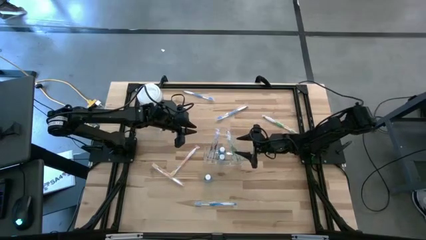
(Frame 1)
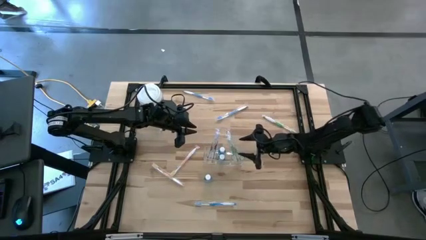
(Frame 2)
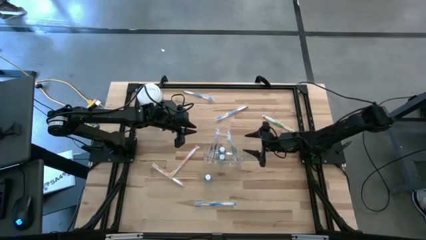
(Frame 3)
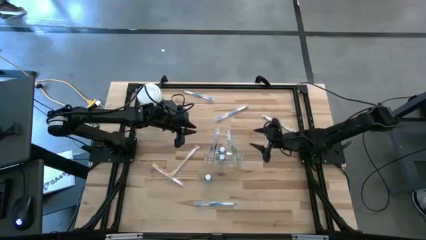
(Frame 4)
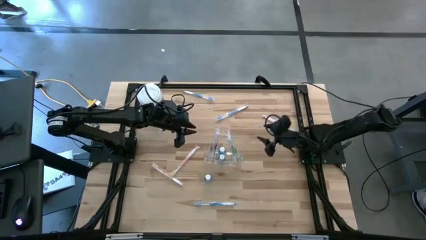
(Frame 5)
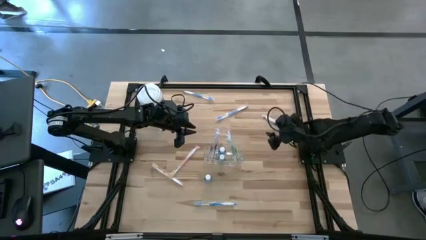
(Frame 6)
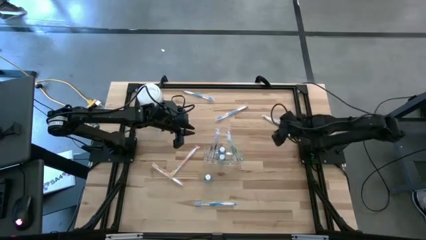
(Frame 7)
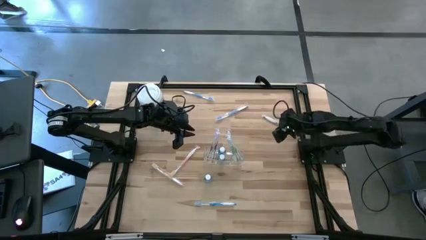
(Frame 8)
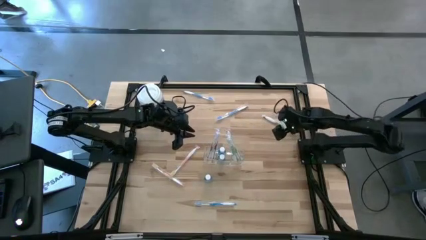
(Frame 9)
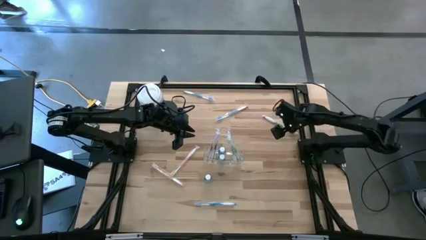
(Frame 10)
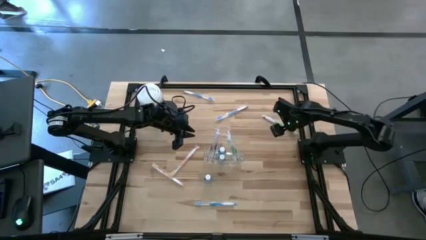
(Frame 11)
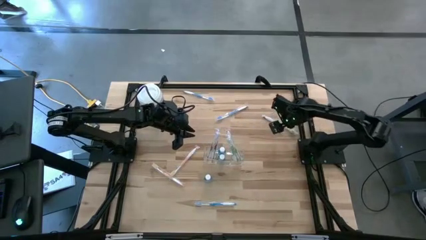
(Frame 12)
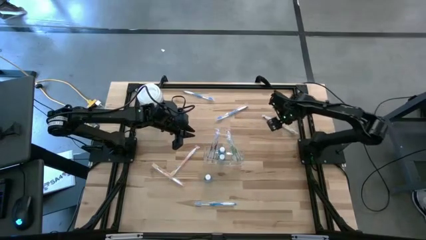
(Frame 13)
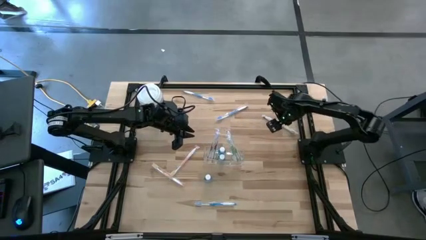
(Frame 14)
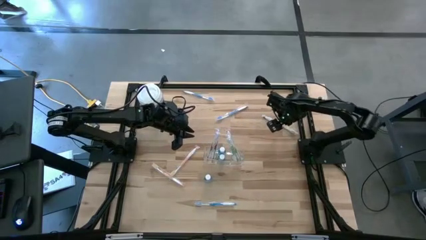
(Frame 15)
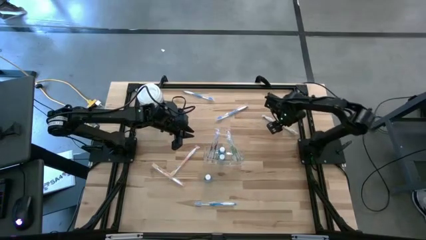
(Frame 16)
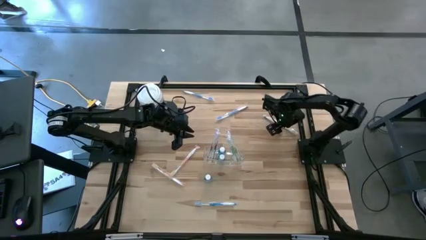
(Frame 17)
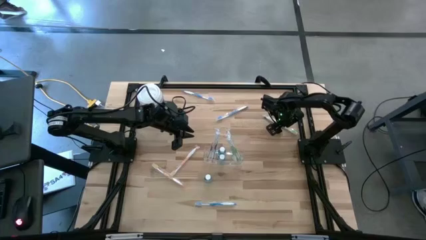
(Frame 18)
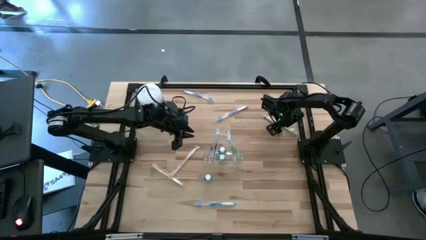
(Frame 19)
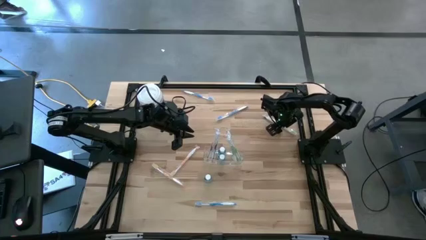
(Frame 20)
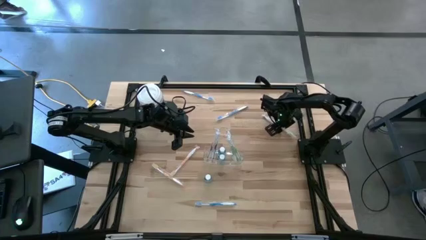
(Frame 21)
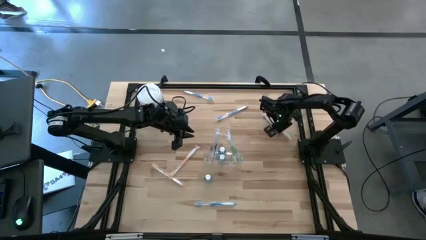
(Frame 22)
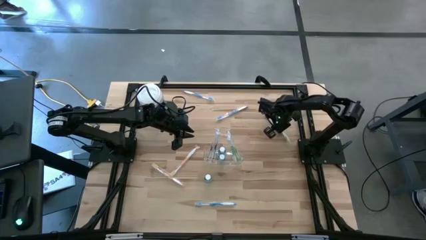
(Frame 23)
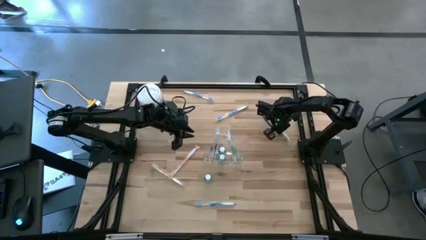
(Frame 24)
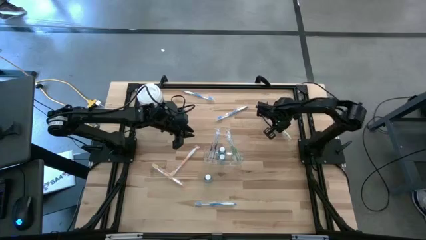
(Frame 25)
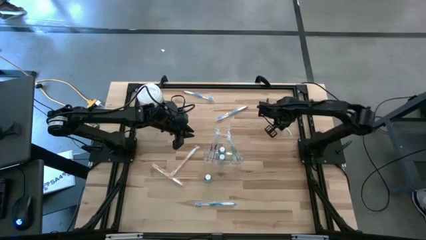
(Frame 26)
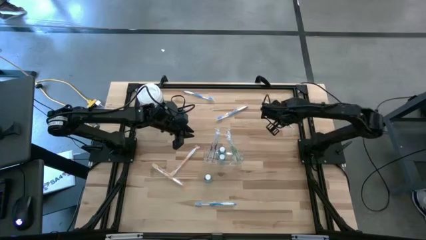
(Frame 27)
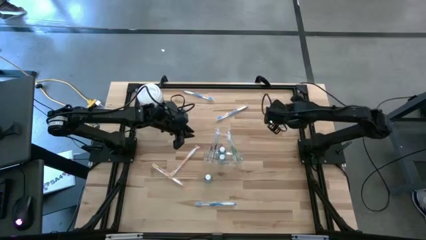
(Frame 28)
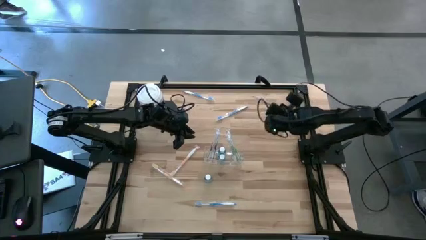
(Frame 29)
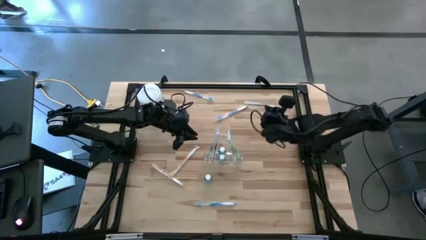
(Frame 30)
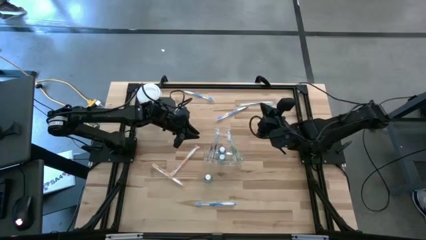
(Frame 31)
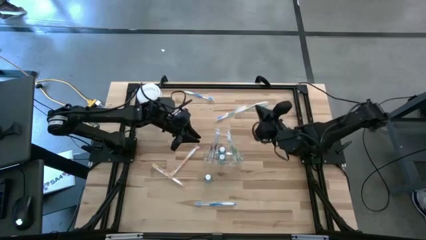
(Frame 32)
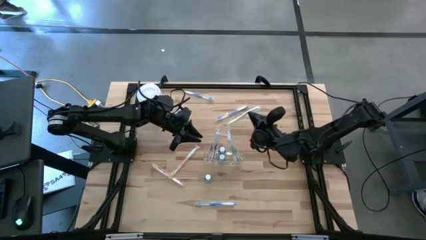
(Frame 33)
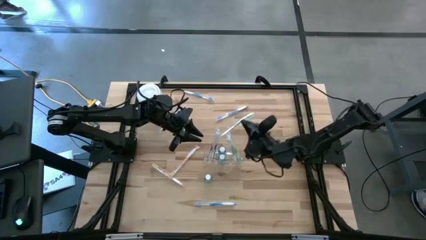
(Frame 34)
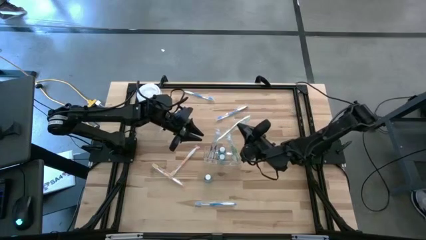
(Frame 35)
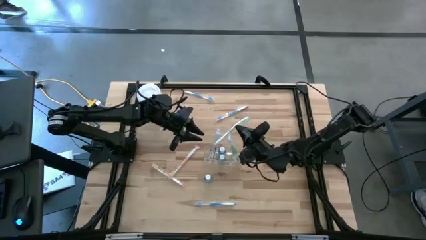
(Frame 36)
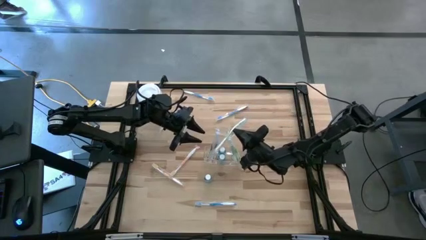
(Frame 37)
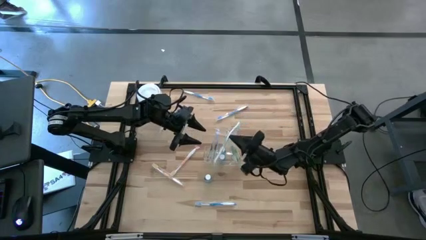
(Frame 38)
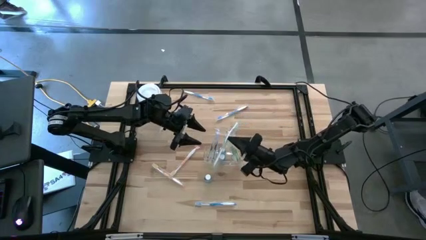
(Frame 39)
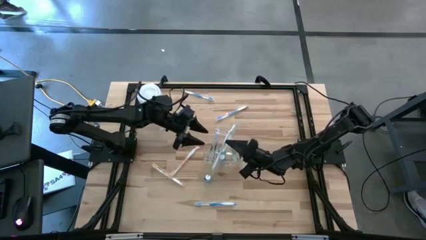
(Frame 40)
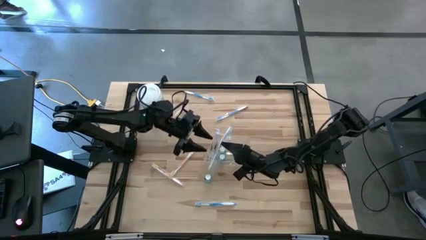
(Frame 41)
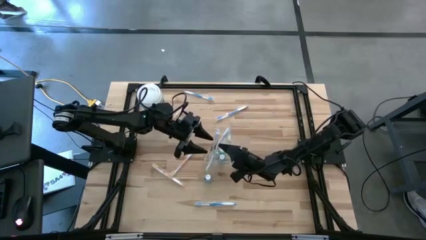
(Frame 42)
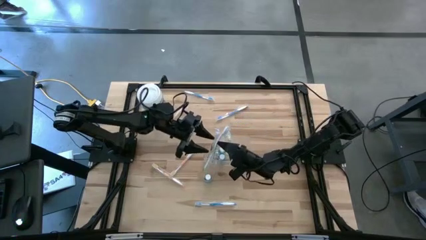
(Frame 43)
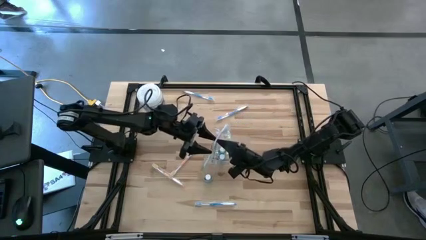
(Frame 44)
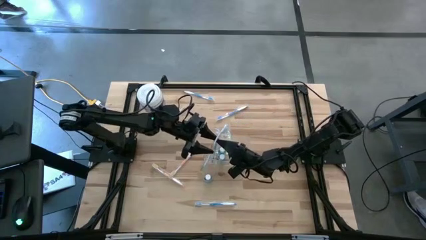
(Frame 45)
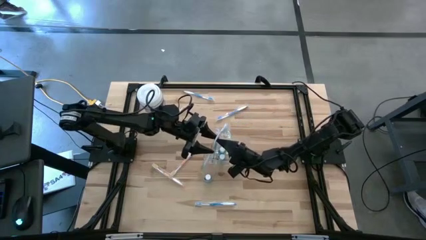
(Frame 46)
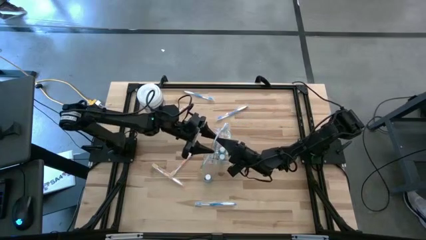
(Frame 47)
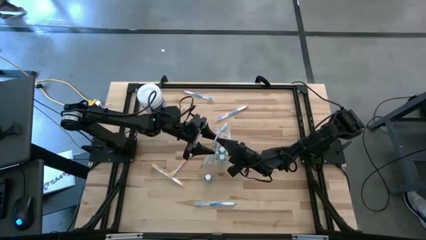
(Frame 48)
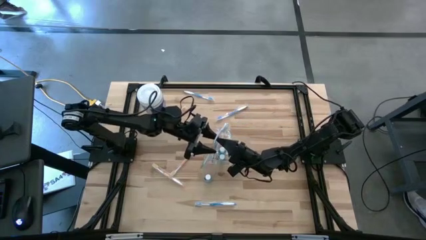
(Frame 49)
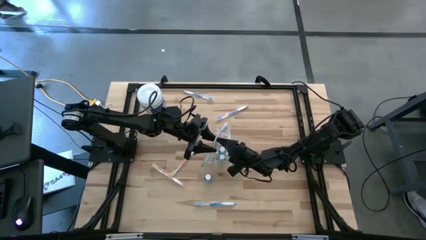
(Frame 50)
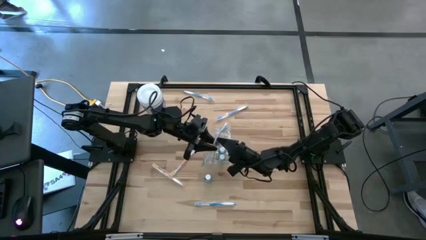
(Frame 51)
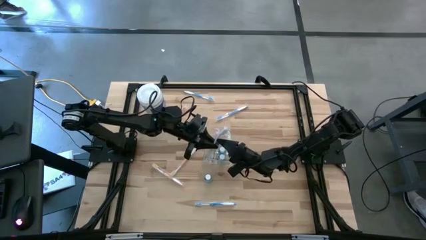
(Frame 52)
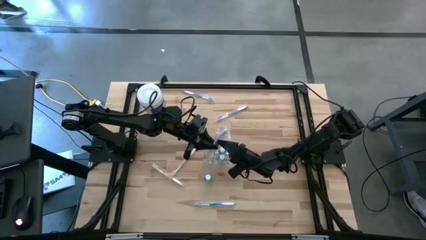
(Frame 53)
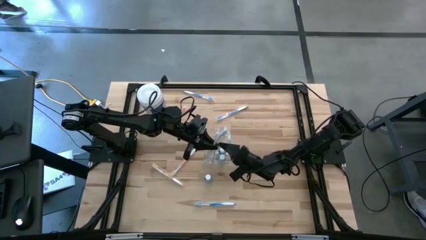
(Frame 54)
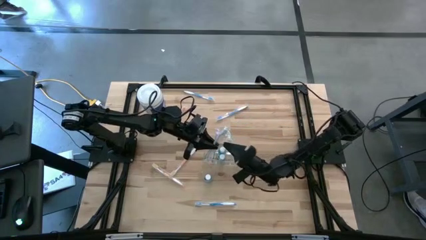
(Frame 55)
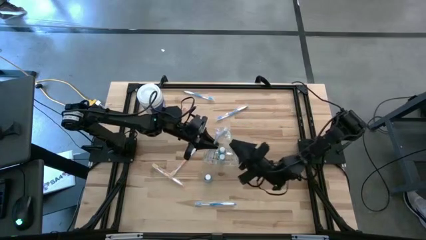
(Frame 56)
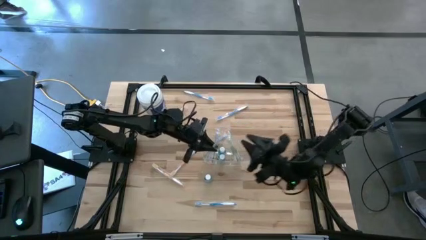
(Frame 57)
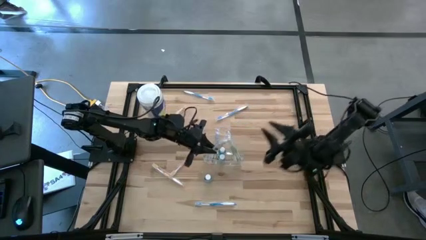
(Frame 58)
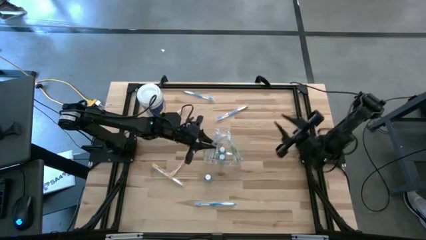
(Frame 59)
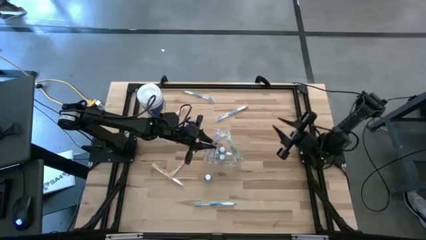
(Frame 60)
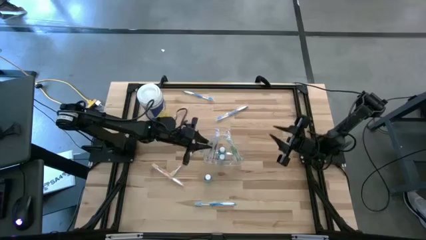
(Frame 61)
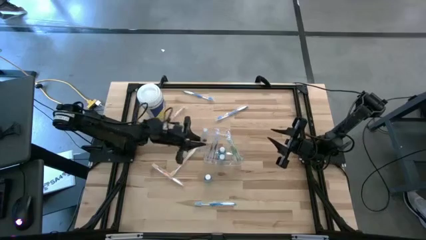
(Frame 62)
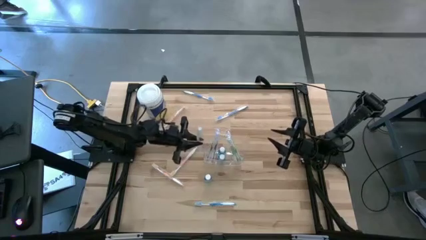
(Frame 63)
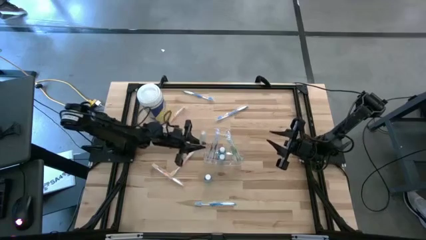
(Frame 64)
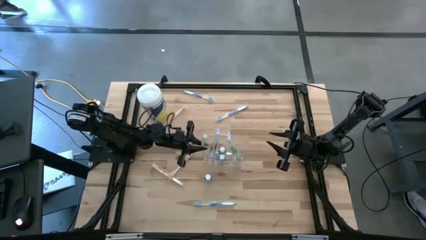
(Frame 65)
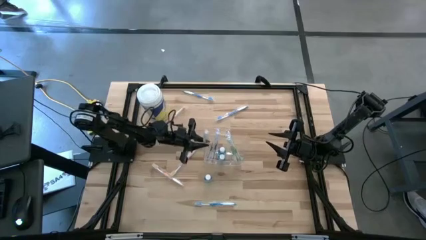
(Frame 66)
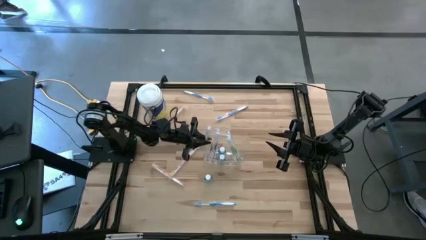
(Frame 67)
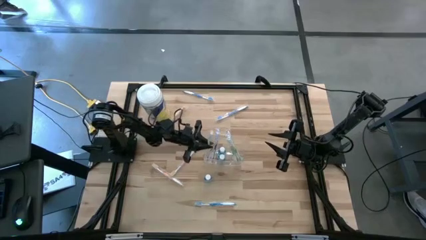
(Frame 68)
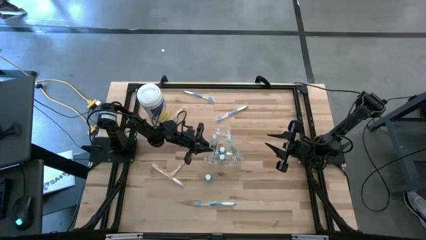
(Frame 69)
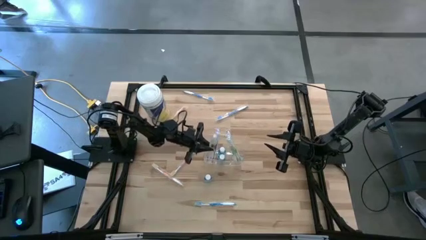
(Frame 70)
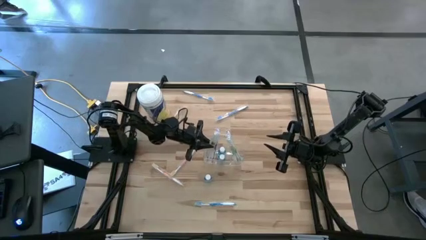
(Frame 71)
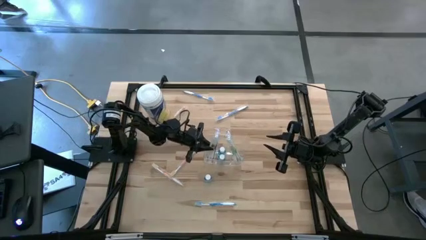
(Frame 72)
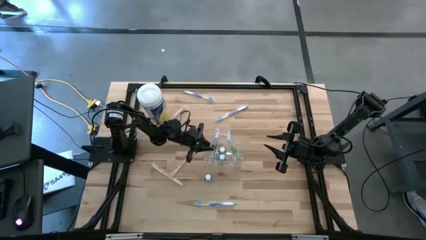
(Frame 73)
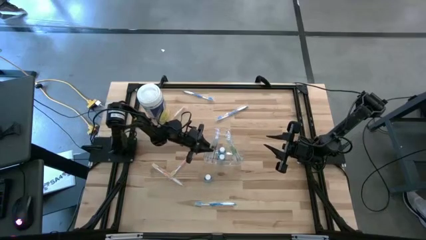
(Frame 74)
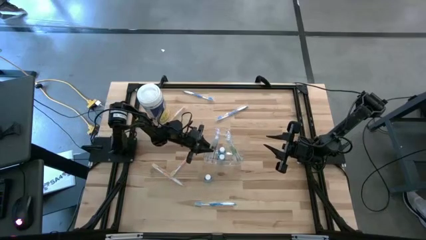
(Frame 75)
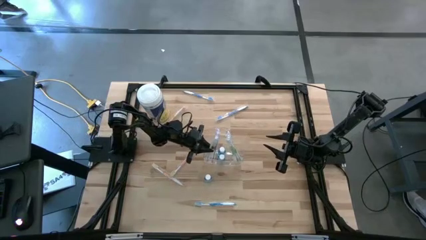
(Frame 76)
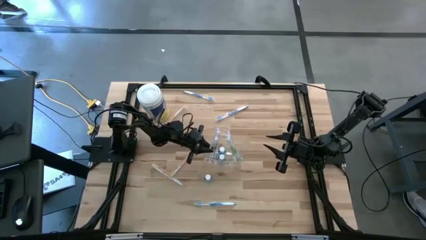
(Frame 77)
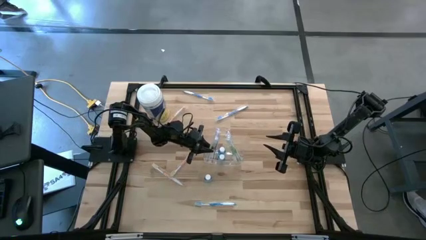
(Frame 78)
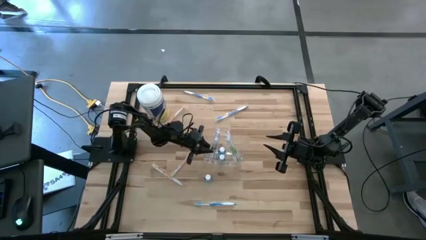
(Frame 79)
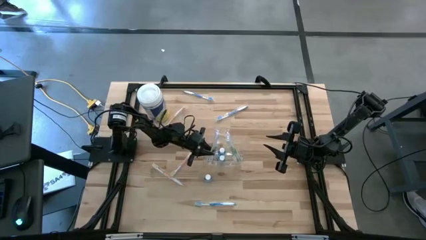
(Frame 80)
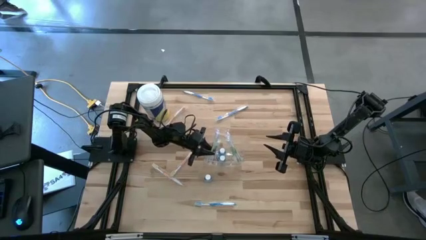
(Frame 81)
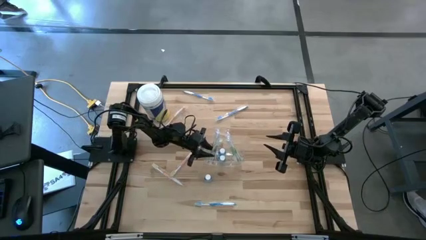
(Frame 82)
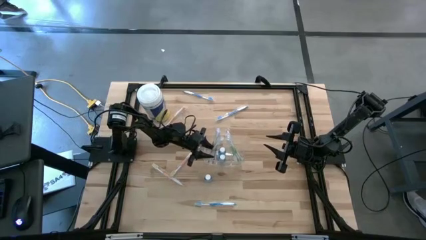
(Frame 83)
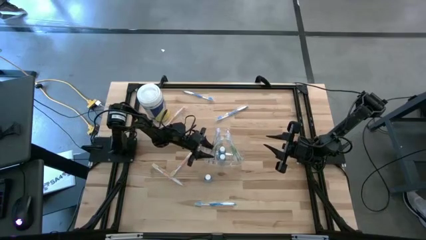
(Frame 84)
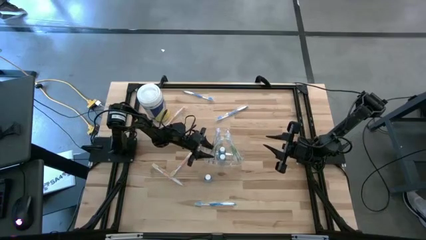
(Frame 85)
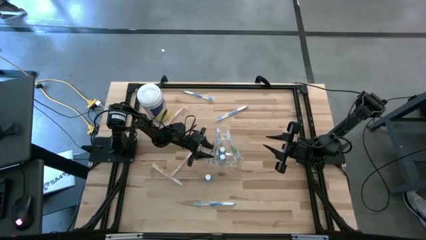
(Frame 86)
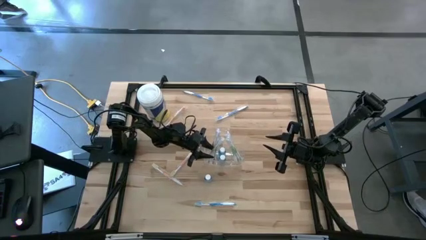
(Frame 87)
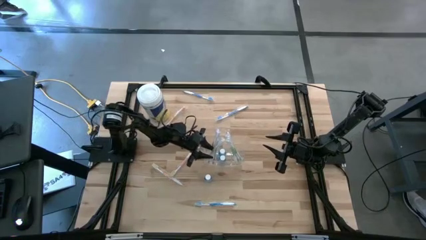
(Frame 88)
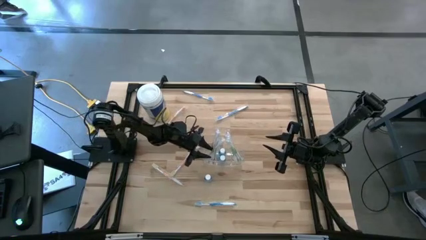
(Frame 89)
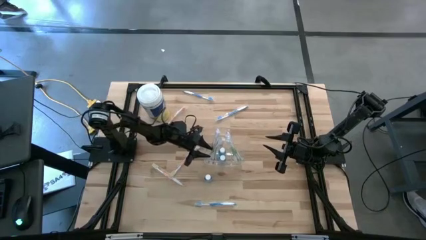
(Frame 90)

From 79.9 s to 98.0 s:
Task: Pick & Place toothbrushing station
Put the green toothbrush into the transparent organizer
